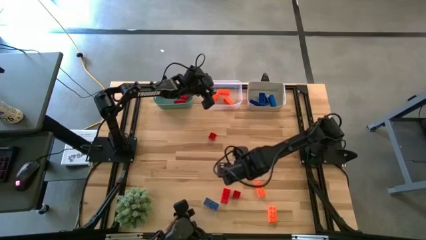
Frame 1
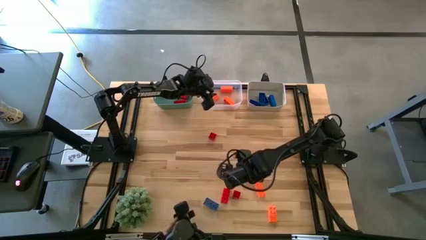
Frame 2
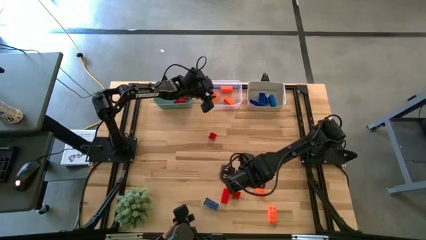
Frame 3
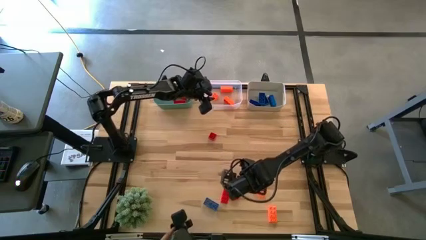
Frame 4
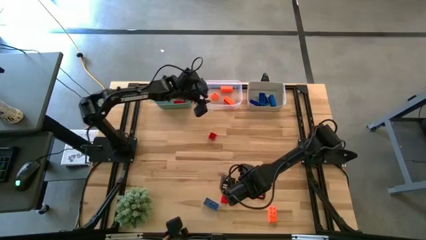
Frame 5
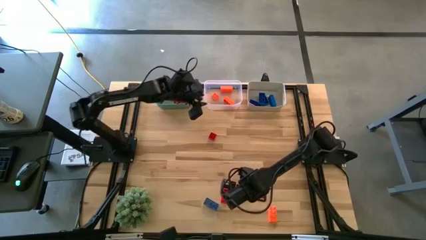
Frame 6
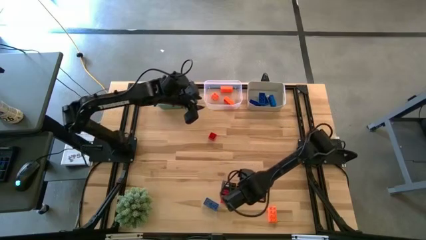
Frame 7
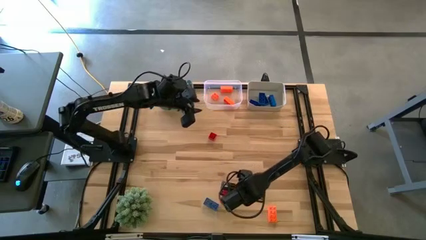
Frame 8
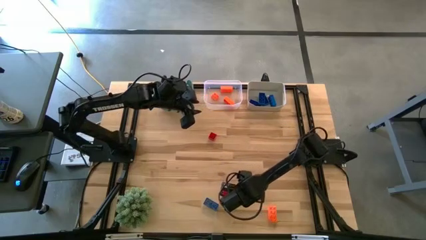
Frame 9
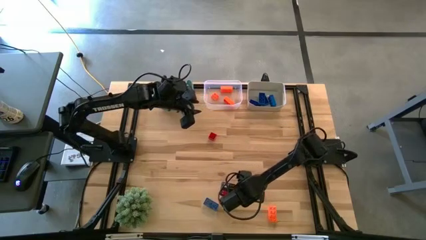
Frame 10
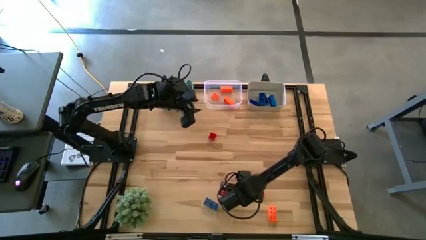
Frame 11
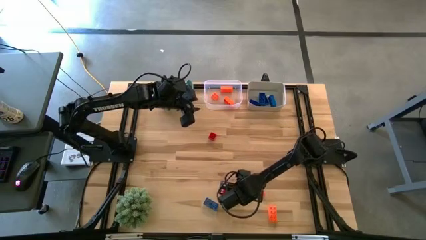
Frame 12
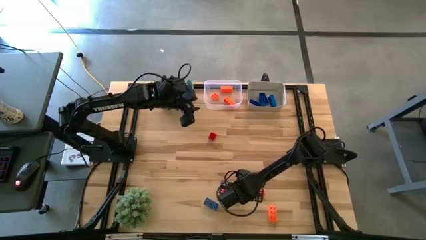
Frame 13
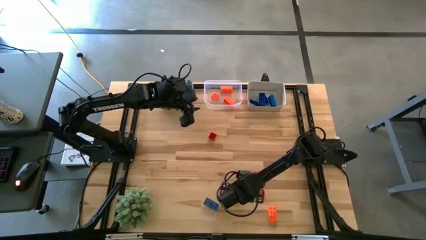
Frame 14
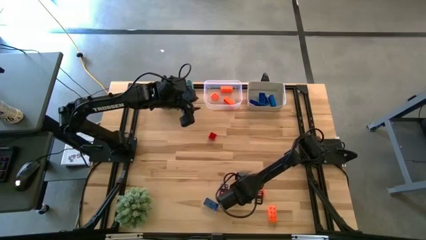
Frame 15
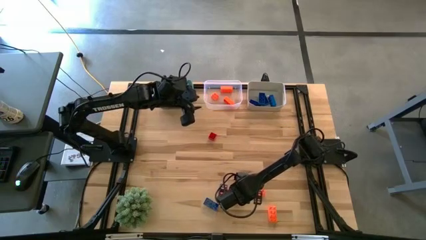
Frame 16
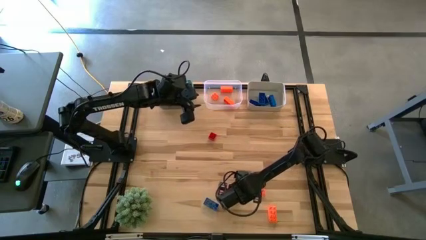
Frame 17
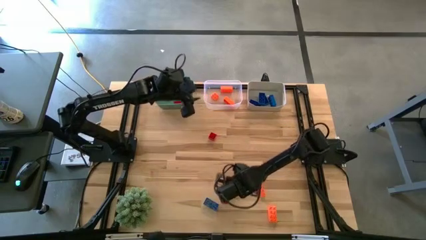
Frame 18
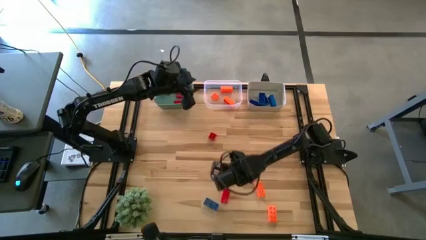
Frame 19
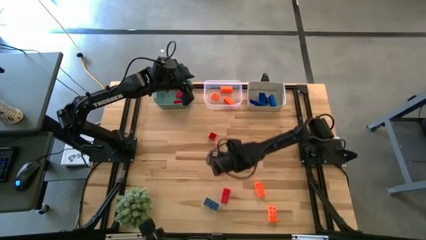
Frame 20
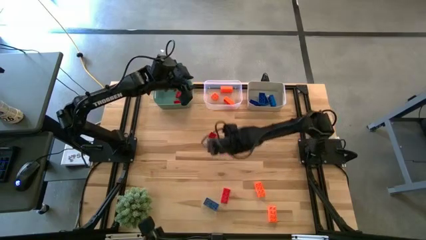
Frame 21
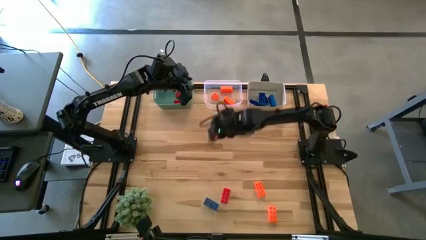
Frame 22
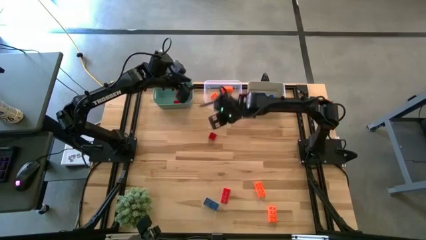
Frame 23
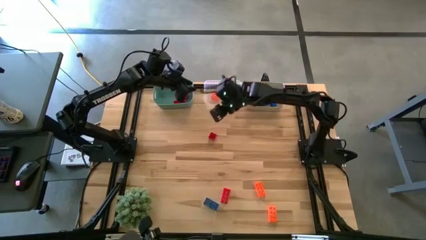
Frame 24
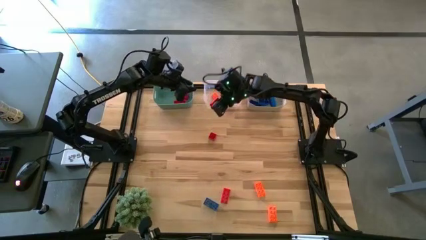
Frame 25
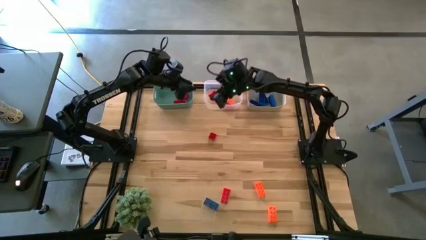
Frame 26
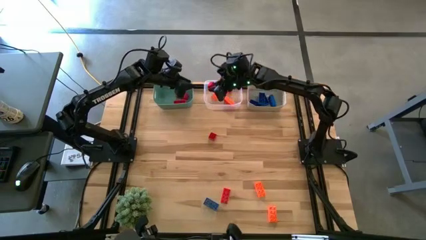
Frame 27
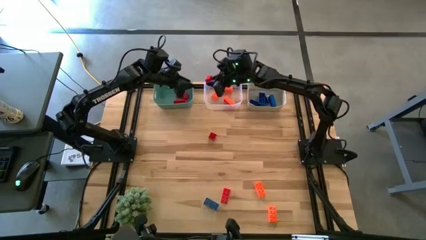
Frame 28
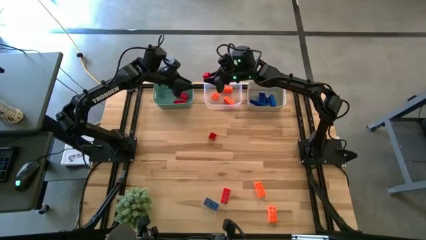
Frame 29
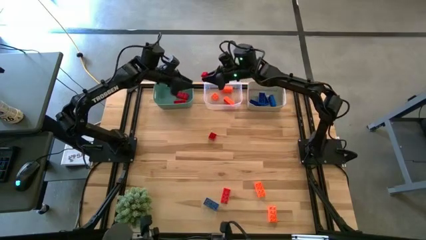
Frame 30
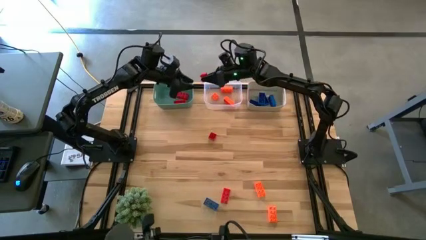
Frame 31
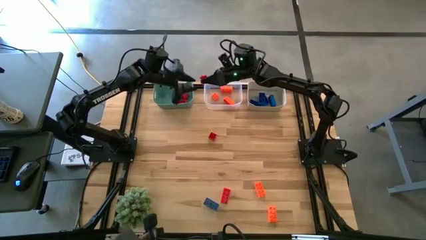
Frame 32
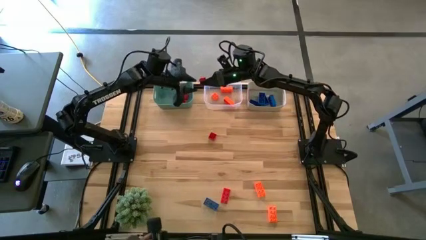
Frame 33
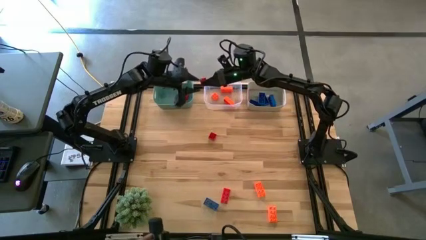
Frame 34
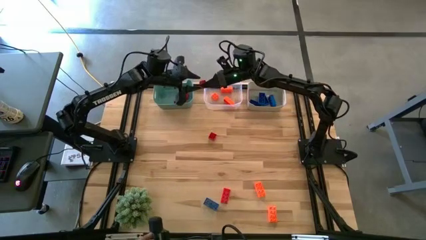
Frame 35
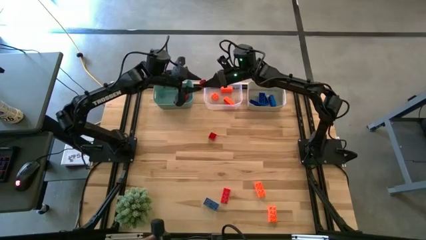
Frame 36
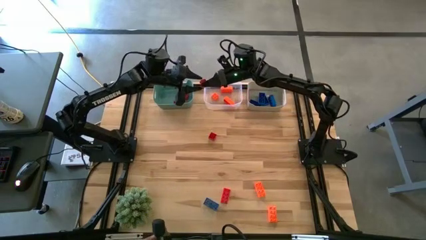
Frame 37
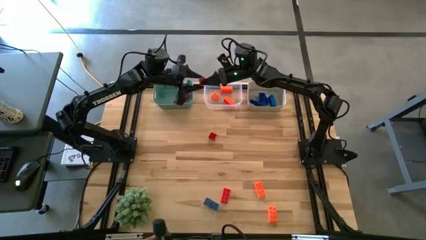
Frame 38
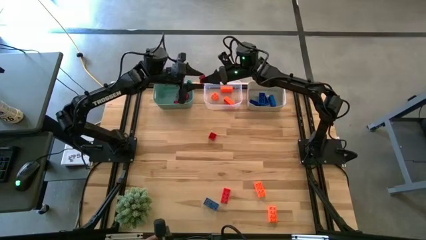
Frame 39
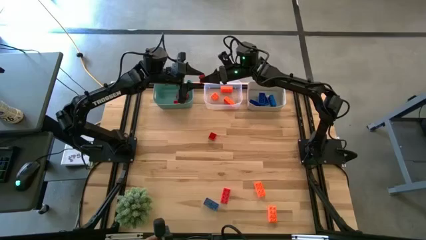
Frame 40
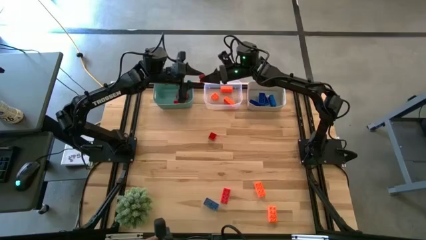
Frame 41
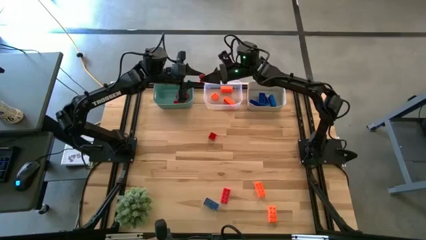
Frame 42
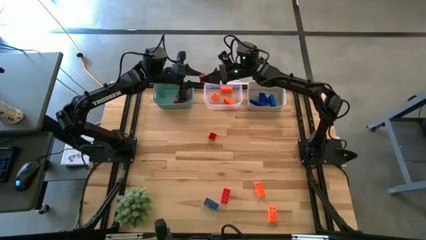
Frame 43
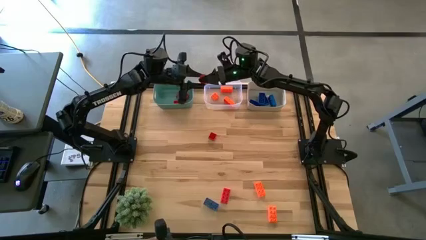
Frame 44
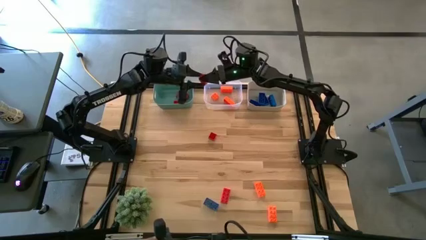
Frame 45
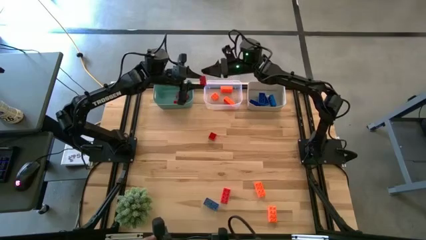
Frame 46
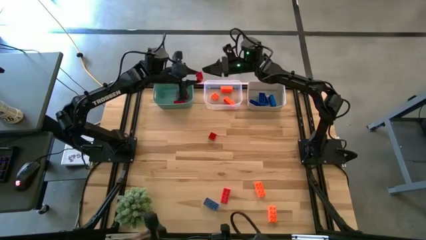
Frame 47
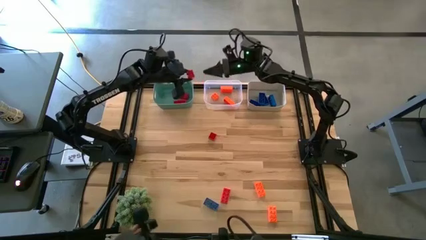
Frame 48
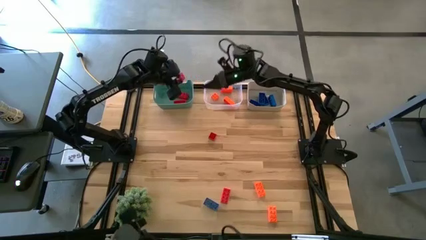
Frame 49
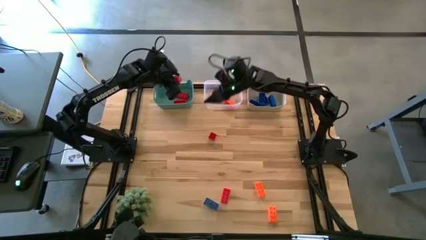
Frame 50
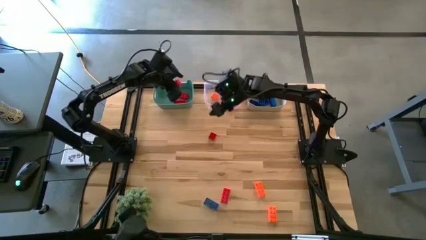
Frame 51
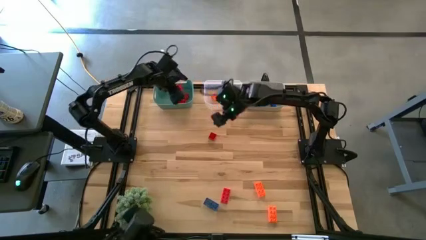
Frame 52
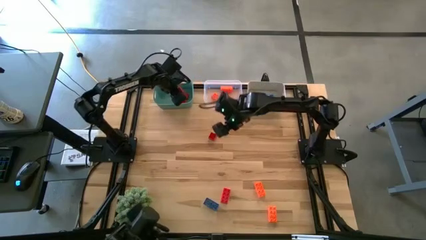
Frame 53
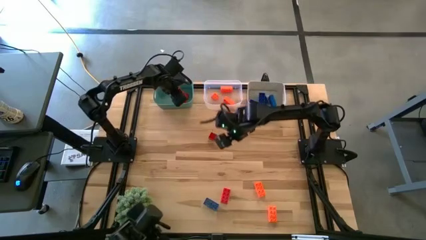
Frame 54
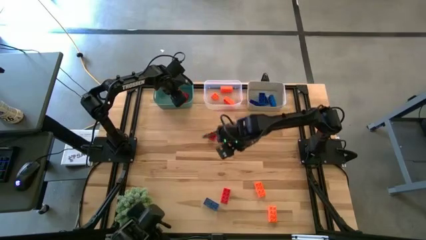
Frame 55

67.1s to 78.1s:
Task: Sort & place blocks by color
Put the red game piece into the blue bin

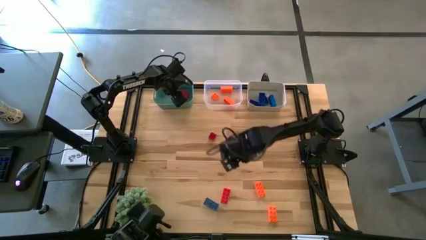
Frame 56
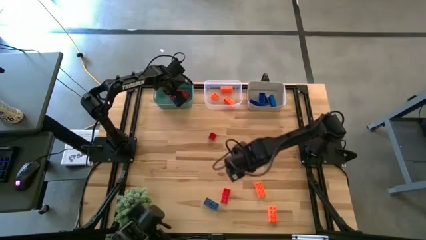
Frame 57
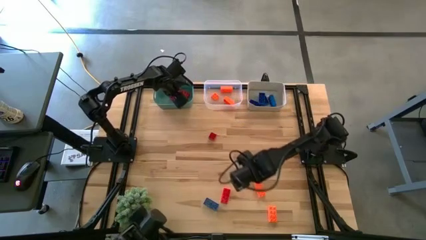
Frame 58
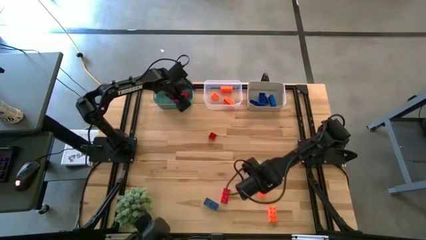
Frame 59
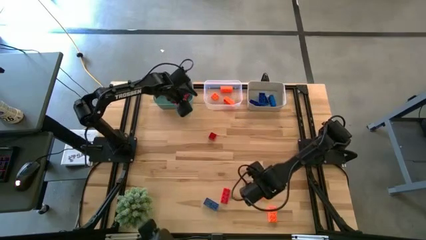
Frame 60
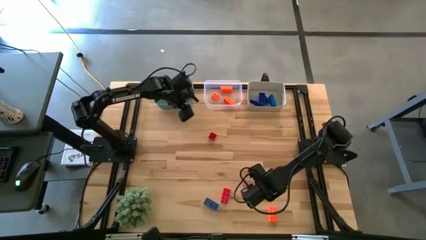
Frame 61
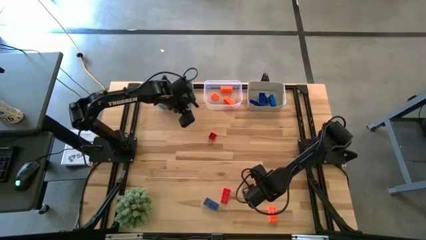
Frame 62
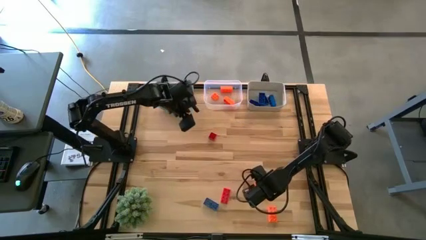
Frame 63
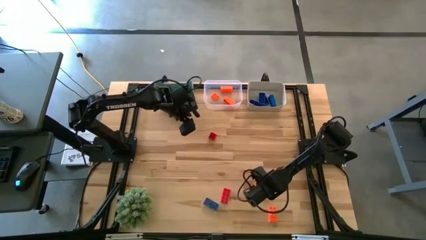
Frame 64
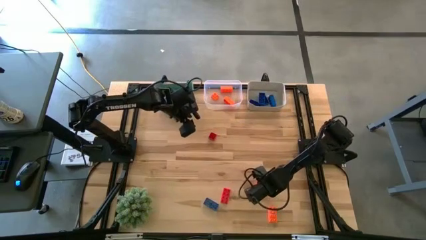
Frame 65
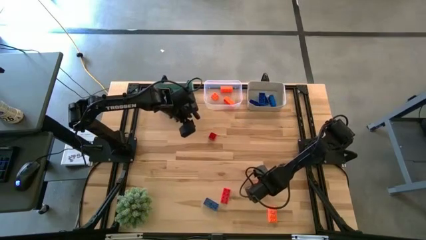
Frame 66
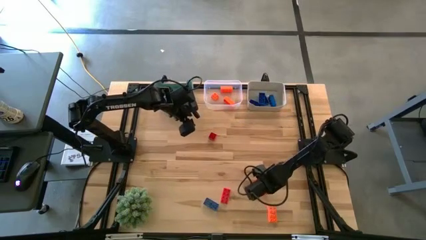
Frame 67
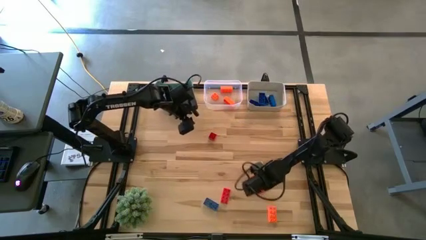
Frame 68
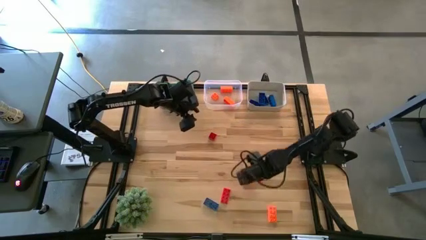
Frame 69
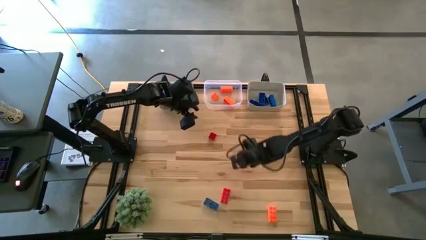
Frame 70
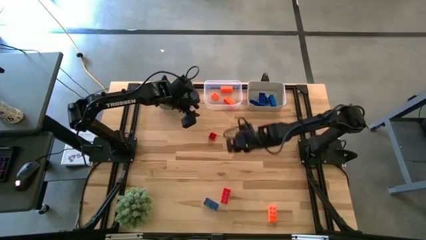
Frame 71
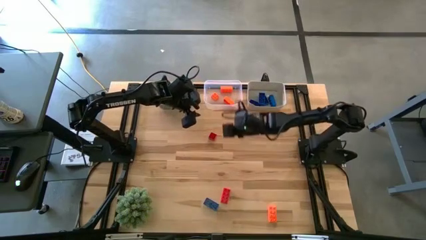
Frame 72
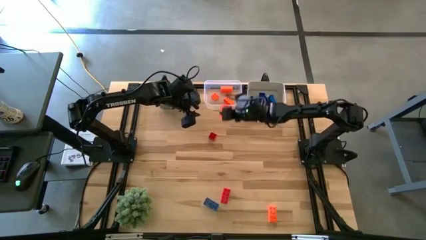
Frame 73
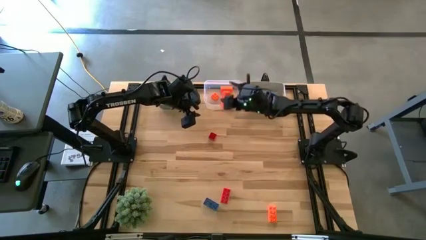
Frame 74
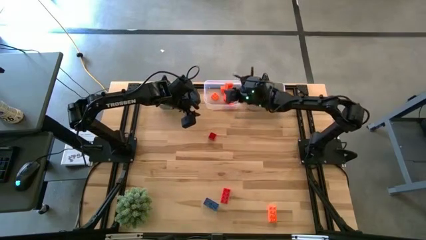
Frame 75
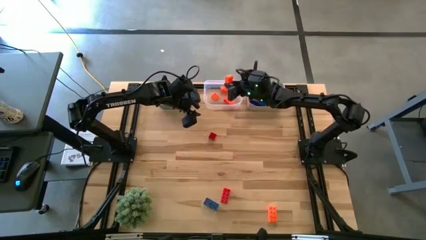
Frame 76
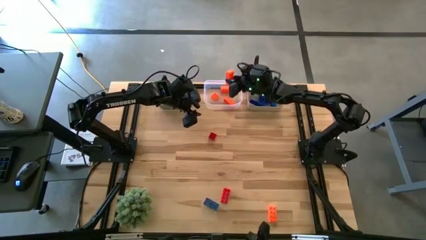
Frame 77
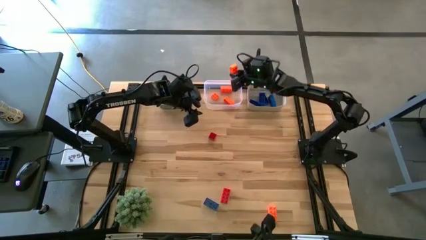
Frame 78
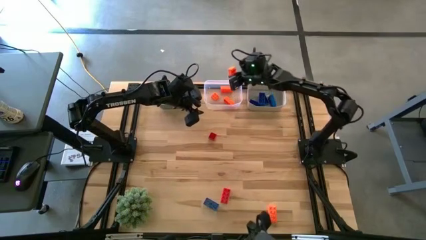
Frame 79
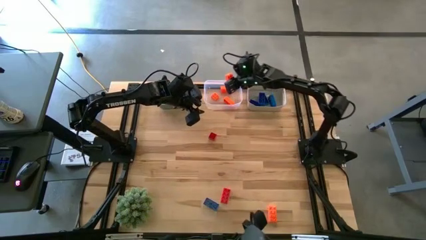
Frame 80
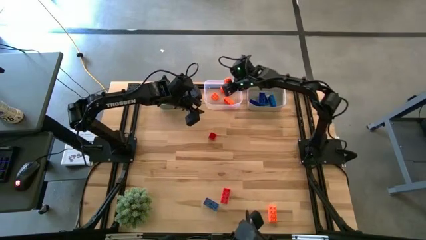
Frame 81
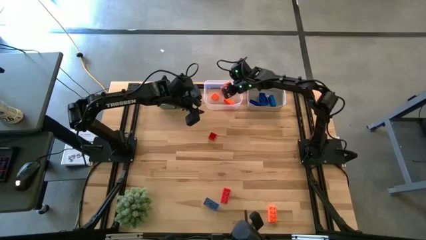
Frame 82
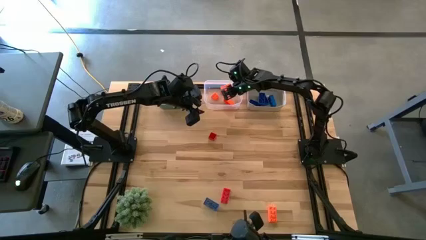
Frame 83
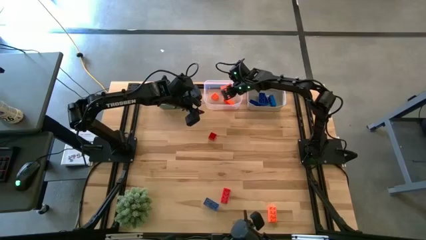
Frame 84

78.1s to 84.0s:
Put the orange game piece into the transparent bin
